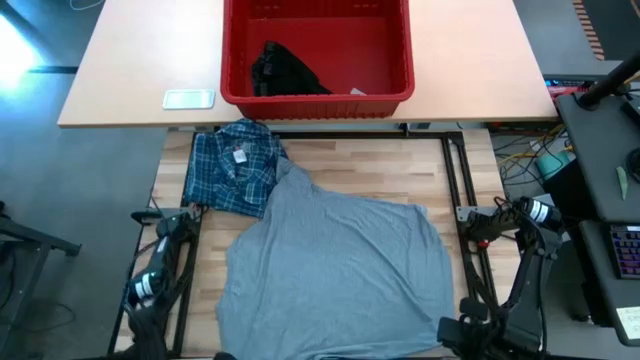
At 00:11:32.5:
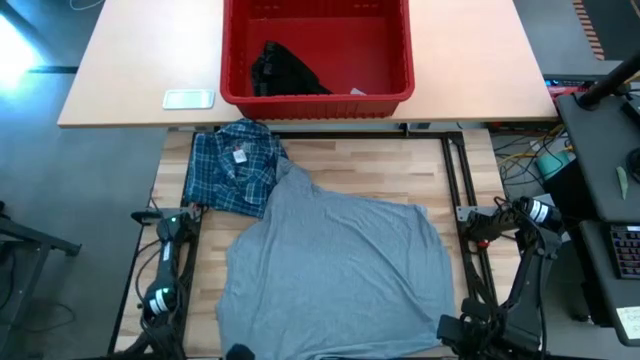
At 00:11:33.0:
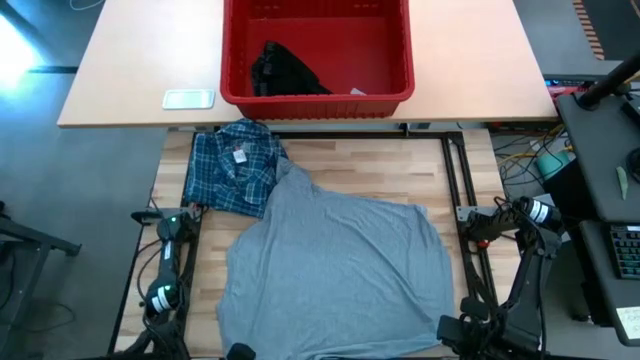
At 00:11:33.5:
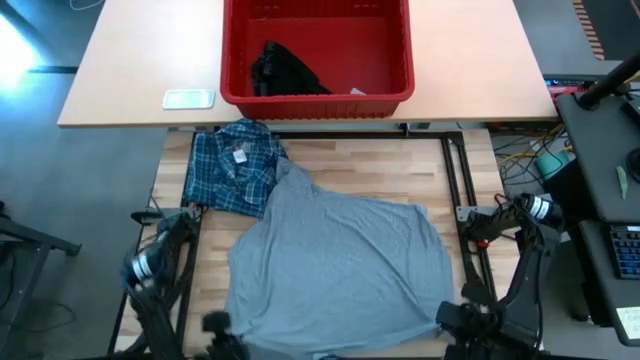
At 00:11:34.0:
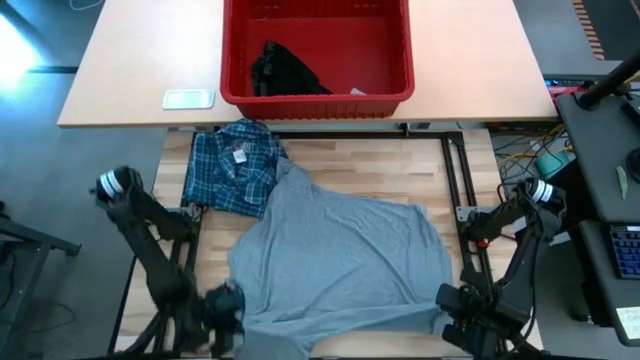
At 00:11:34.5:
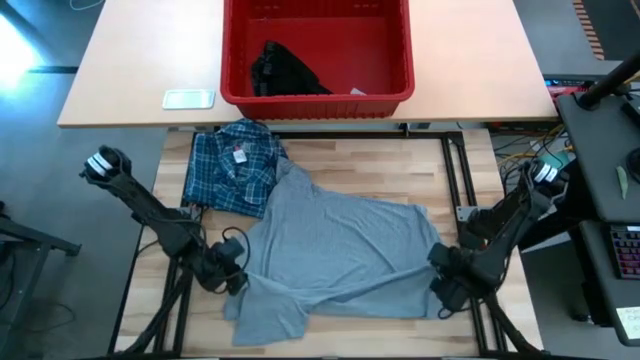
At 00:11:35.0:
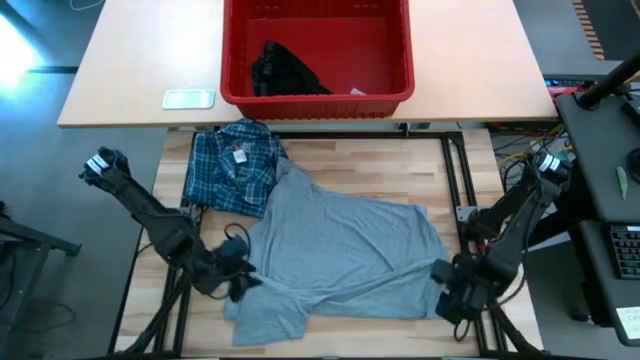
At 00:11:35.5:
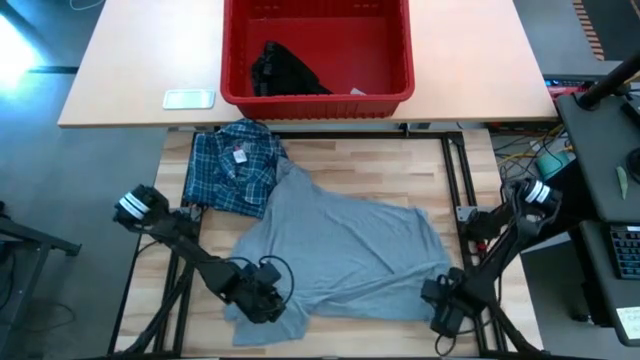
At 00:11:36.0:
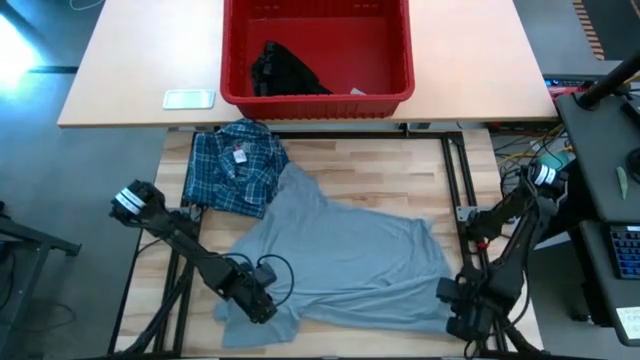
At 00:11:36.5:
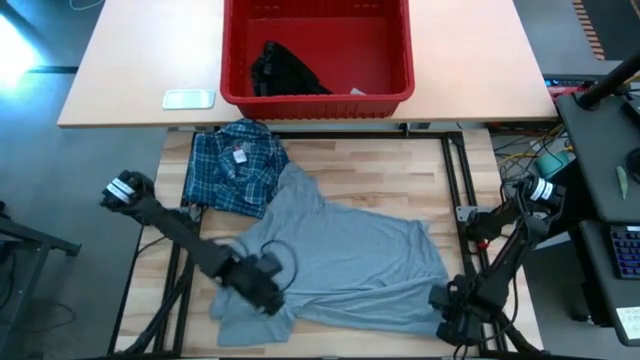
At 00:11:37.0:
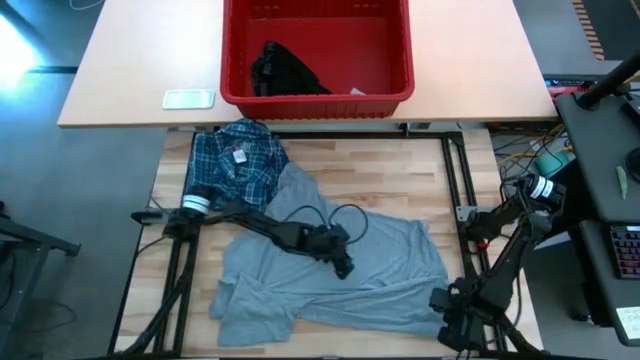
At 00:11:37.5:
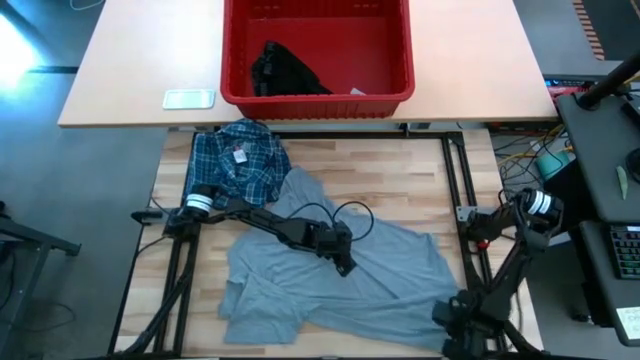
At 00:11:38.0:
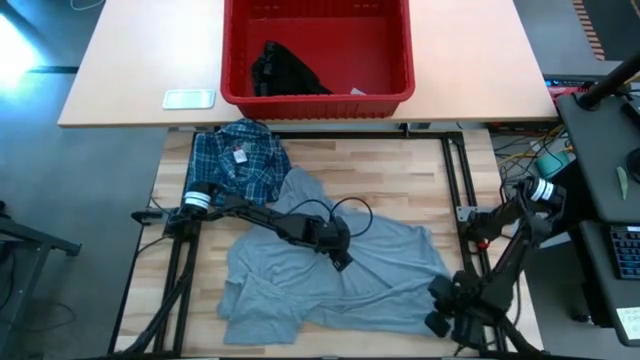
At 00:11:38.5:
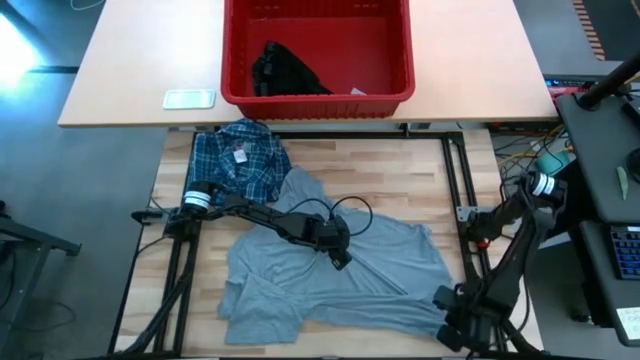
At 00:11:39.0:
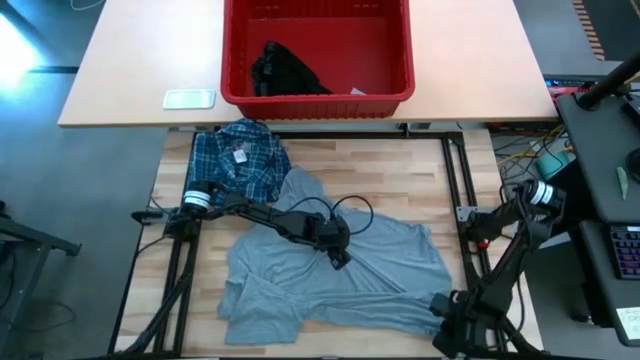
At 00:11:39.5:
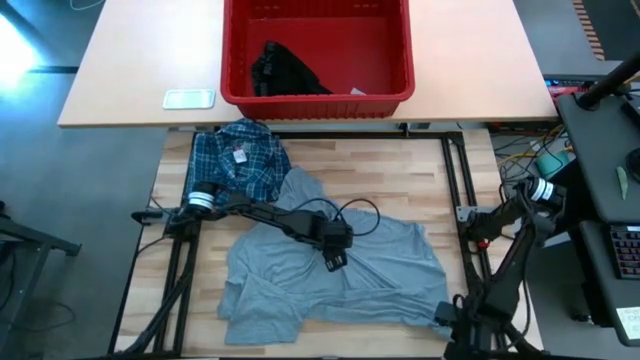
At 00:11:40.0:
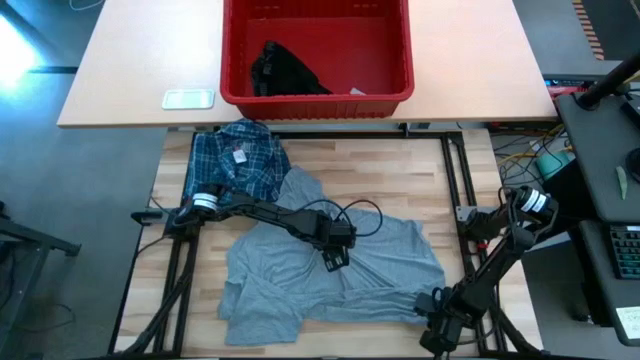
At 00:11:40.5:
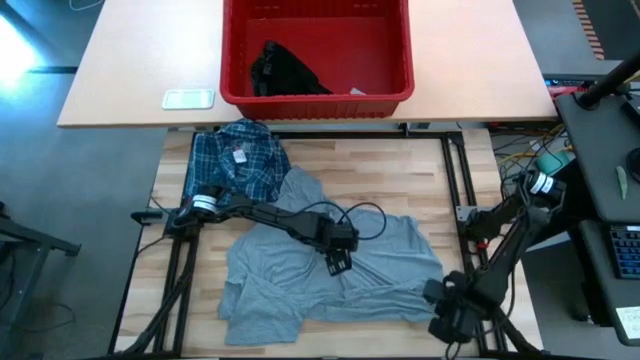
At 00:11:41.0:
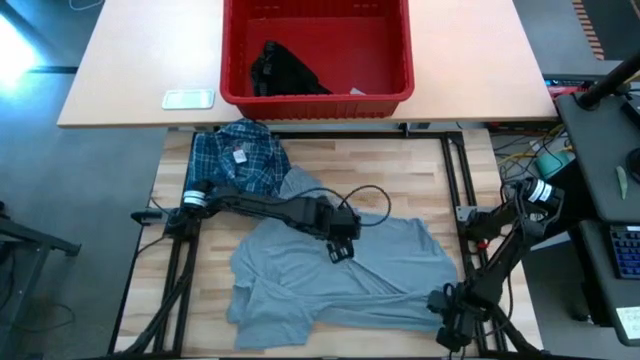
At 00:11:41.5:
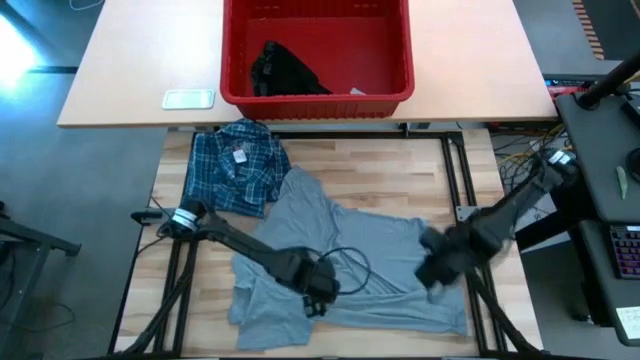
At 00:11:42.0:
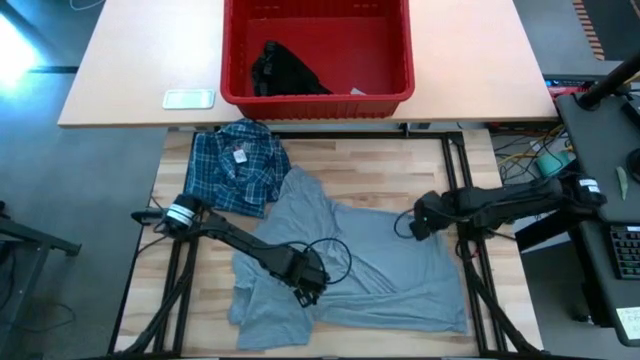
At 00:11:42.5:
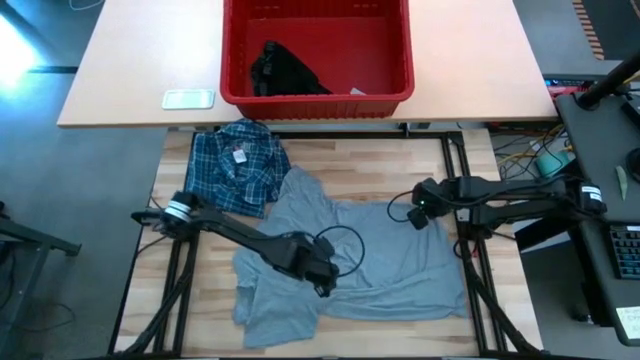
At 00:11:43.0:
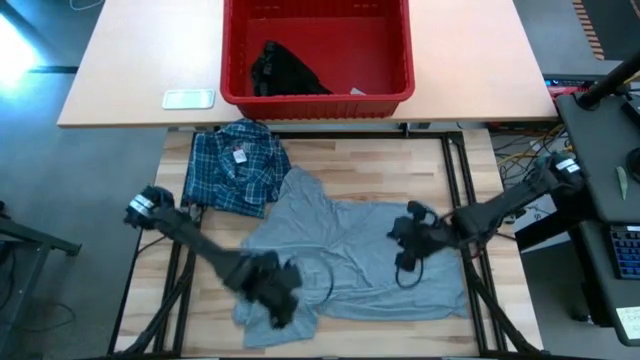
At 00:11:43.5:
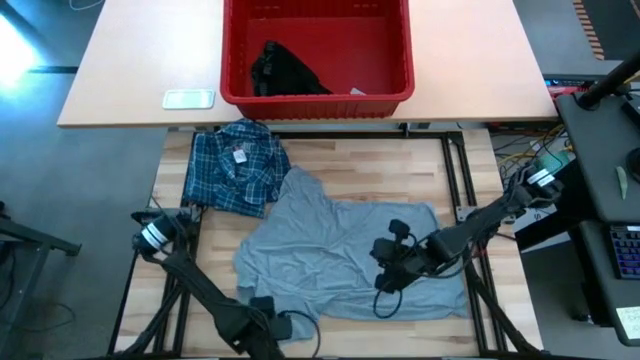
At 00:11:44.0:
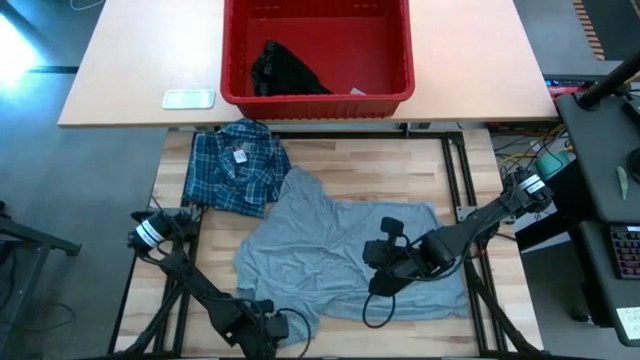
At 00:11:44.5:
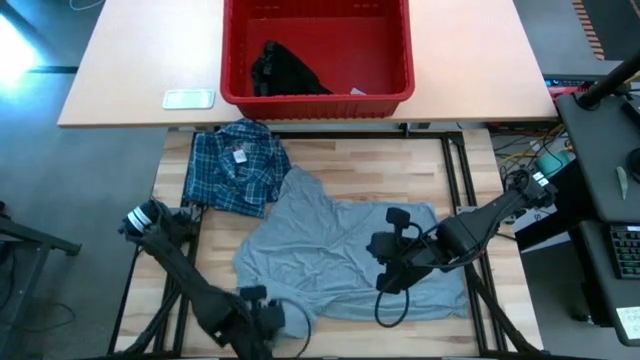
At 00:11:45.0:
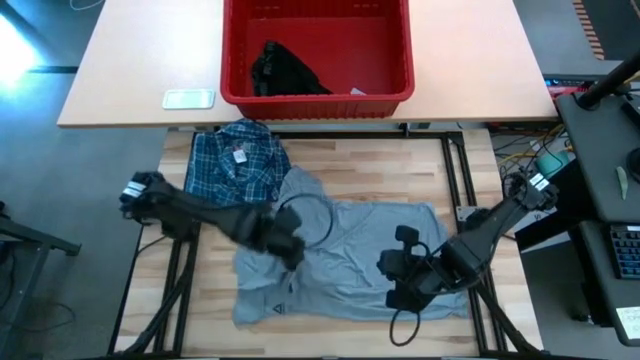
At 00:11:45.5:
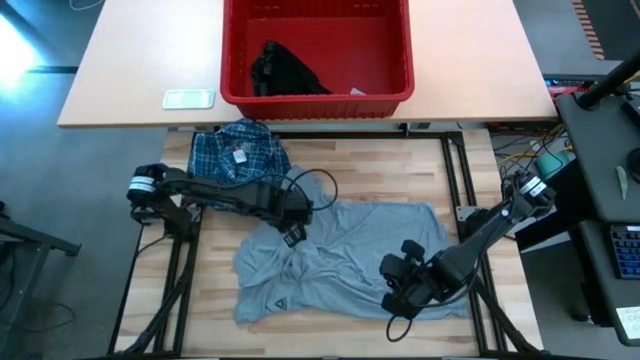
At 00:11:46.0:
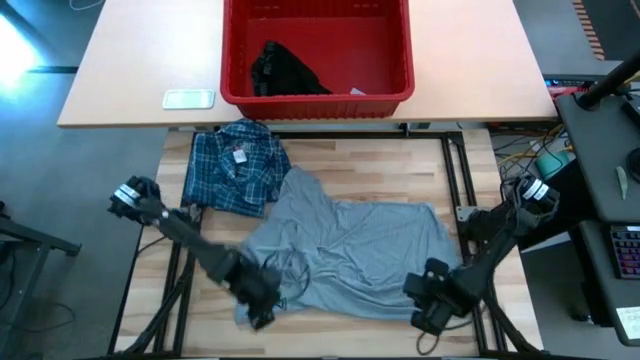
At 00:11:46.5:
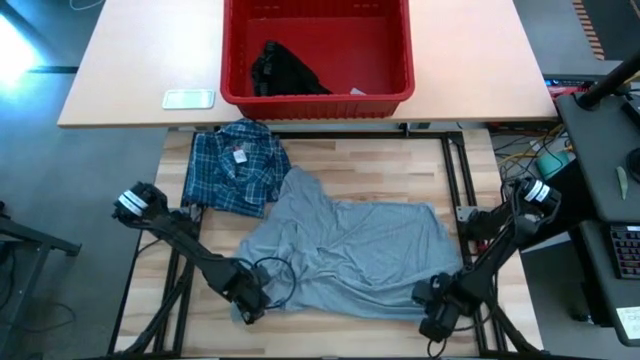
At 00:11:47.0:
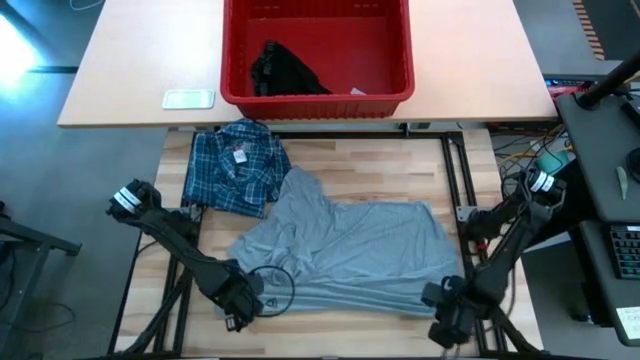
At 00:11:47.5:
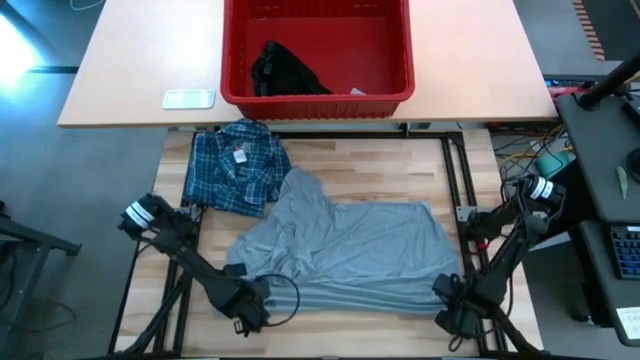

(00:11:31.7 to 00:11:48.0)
Task: Fold Laundry from Bin
Fold the gray shirt

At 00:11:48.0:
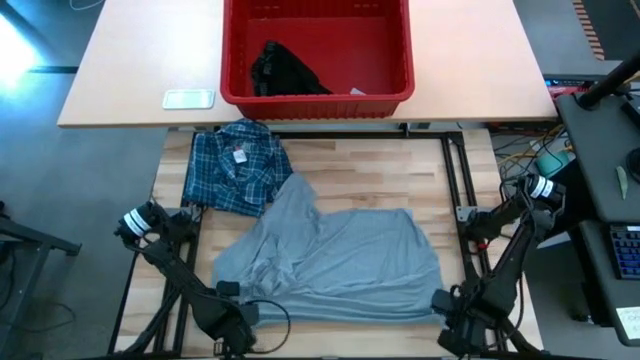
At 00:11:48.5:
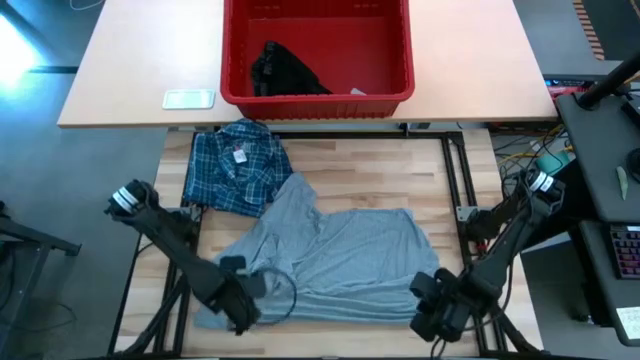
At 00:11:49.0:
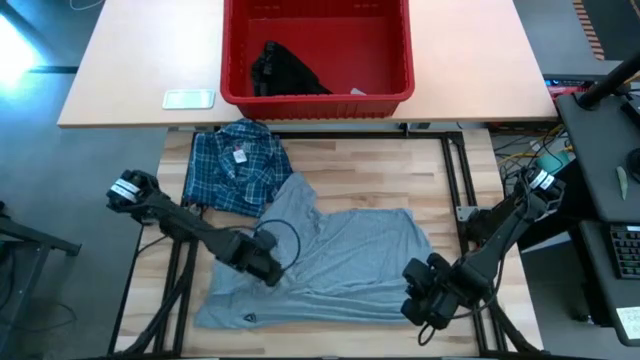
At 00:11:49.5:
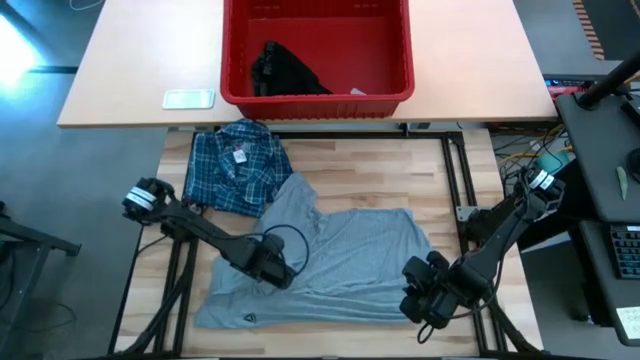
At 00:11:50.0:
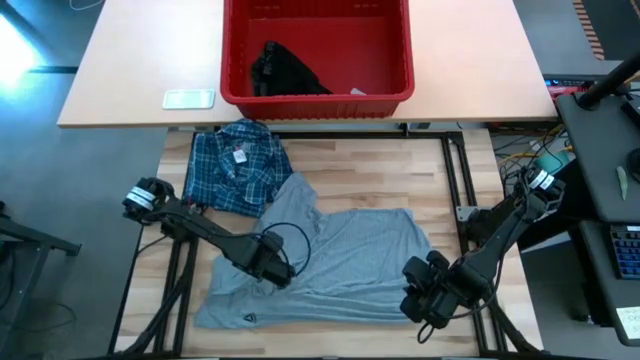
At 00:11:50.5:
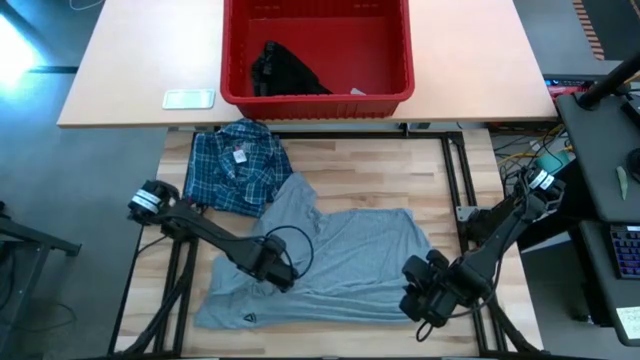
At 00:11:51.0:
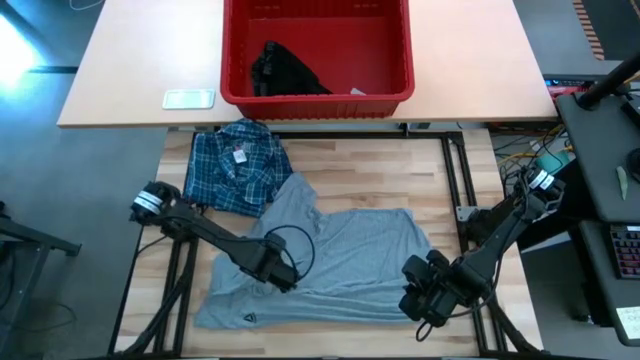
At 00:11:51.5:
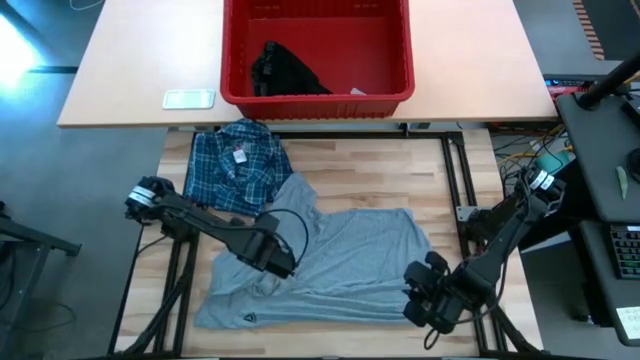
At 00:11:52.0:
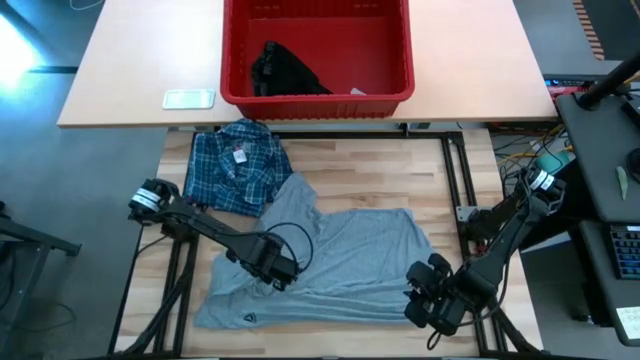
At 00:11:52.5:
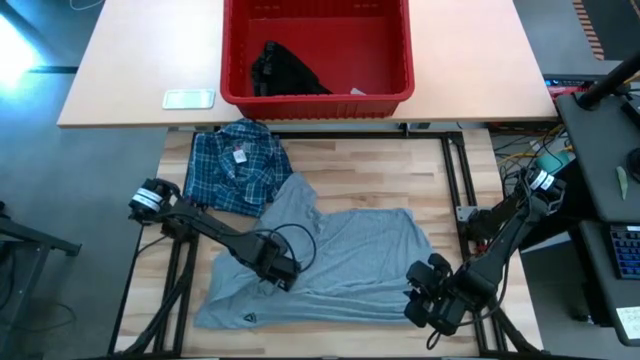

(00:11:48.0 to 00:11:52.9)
Fold the gray shirt

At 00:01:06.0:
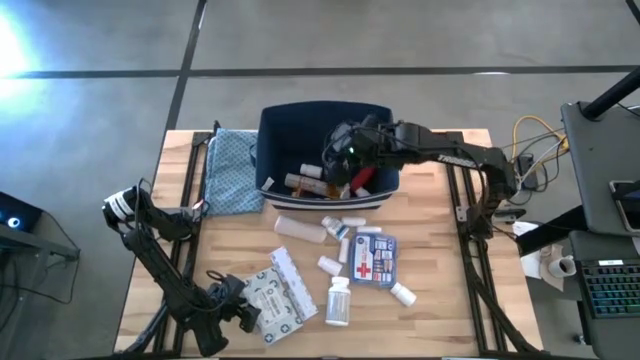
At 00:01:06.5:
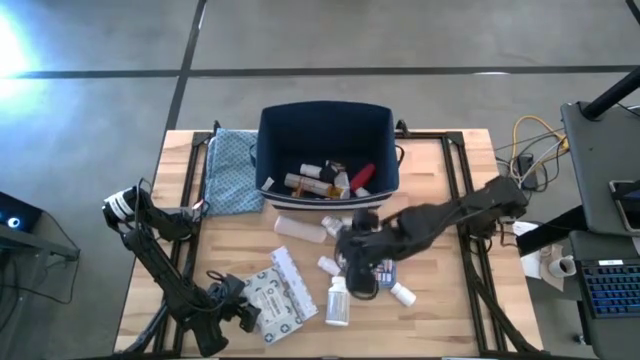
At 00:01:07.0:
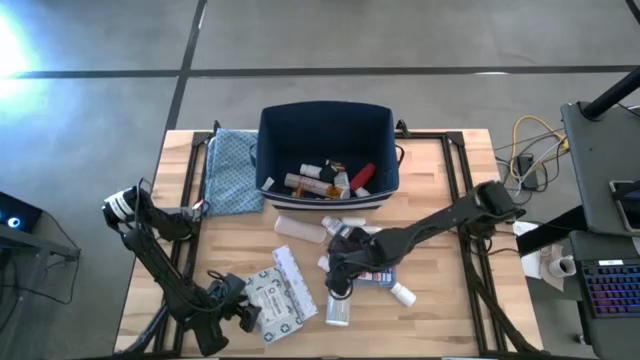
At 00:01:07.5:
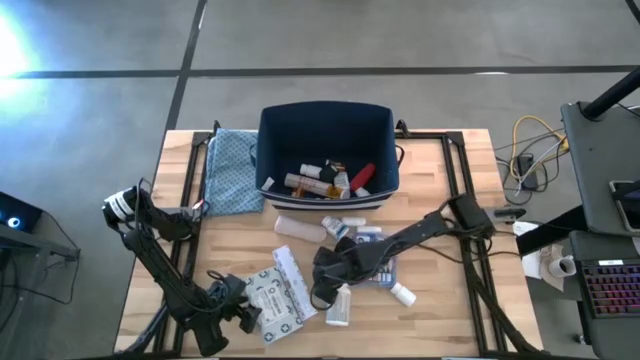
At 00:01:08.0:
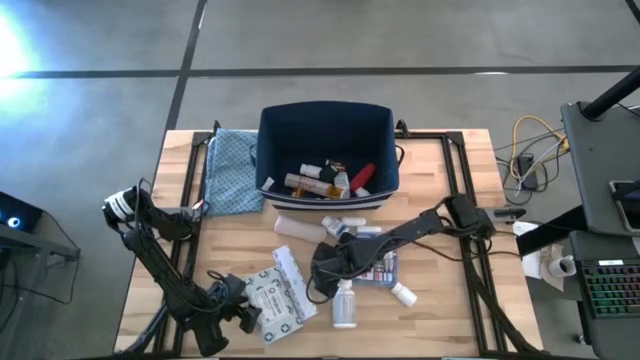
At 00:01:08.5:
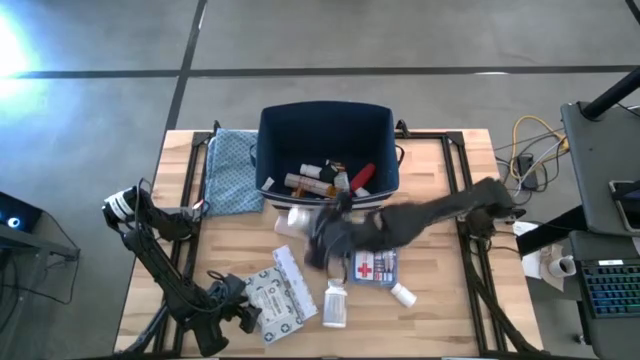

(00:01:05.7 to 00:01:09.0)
Task: Pick & place medical supplies in basket/bin
Put the white pill bottle into the blue bin
